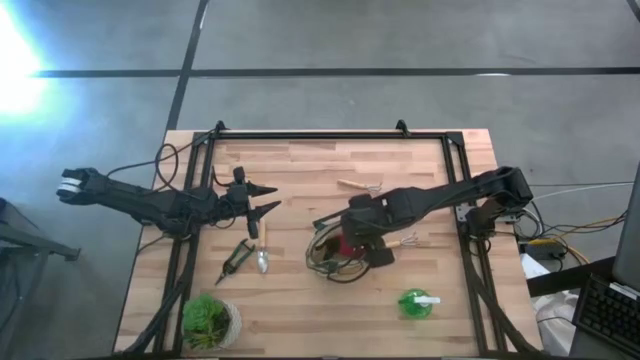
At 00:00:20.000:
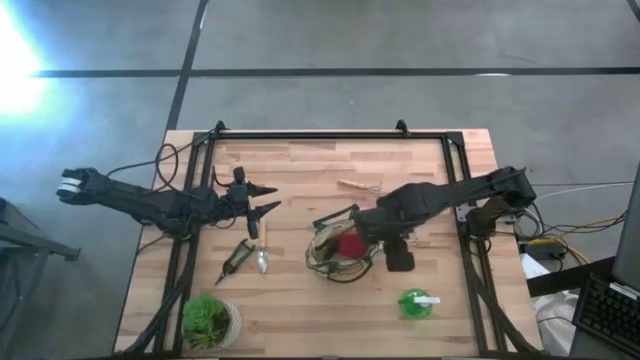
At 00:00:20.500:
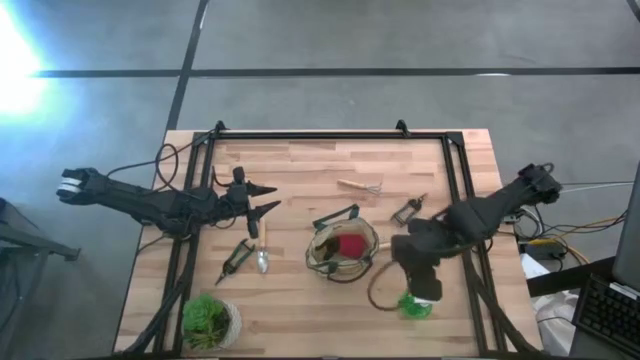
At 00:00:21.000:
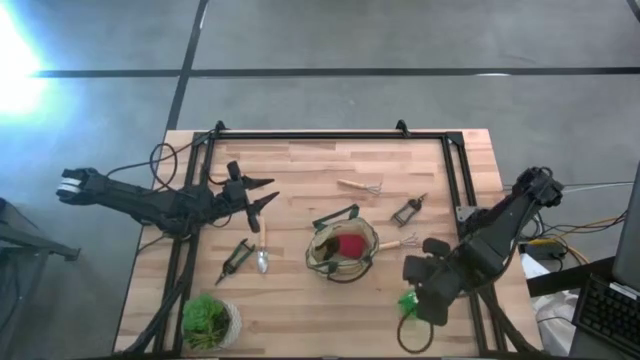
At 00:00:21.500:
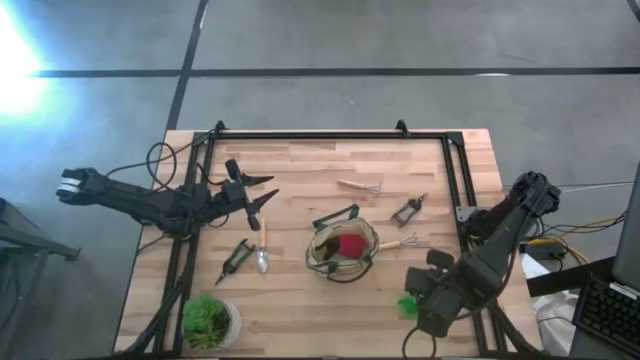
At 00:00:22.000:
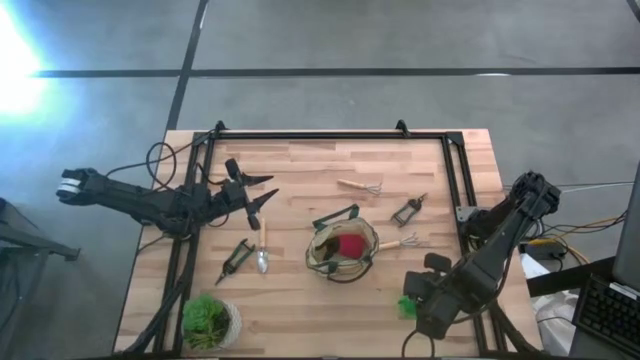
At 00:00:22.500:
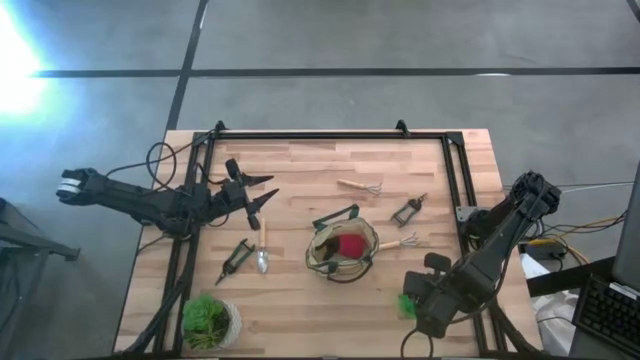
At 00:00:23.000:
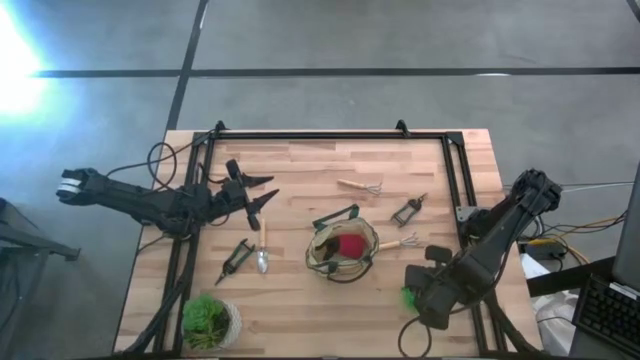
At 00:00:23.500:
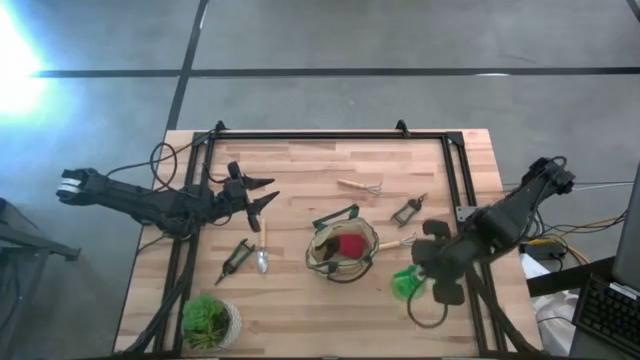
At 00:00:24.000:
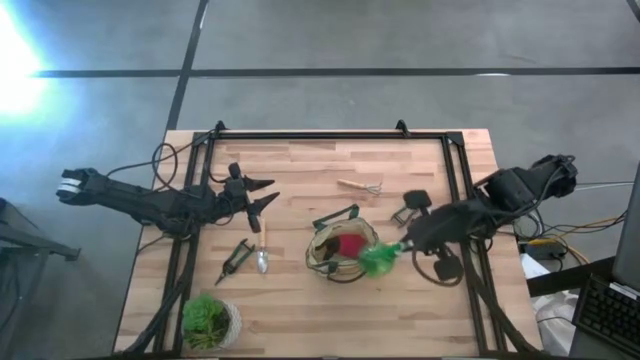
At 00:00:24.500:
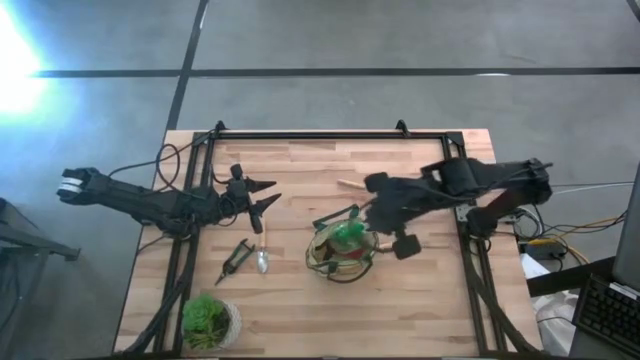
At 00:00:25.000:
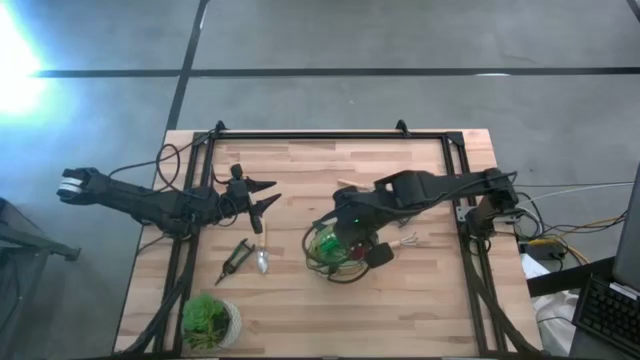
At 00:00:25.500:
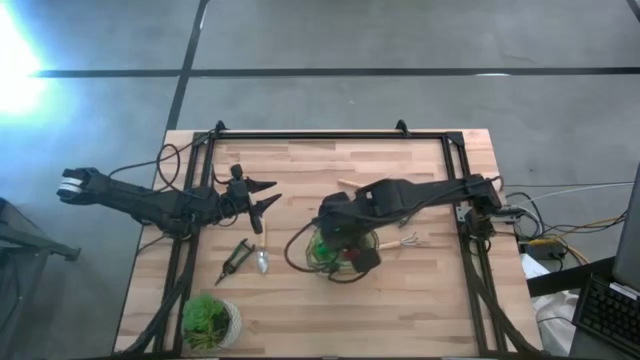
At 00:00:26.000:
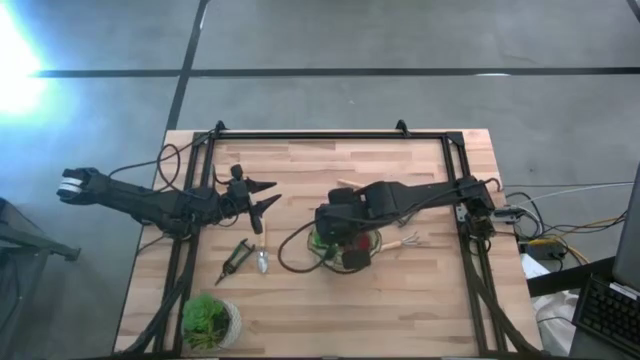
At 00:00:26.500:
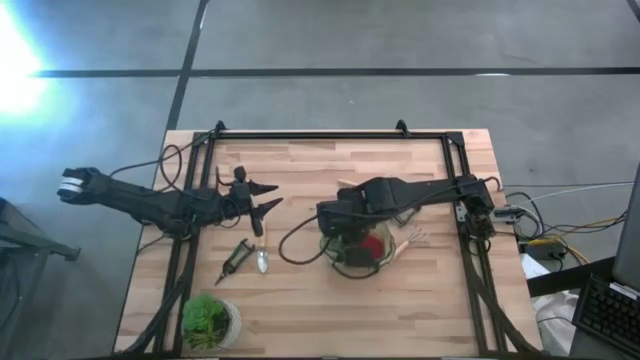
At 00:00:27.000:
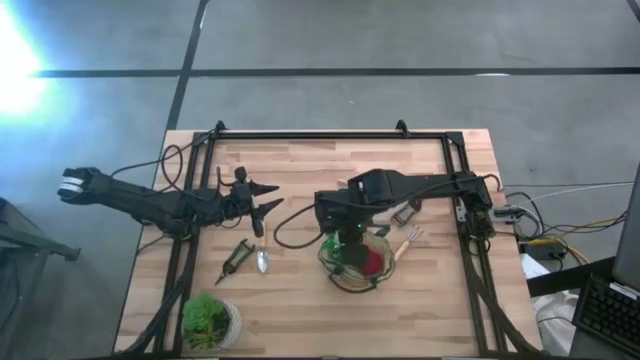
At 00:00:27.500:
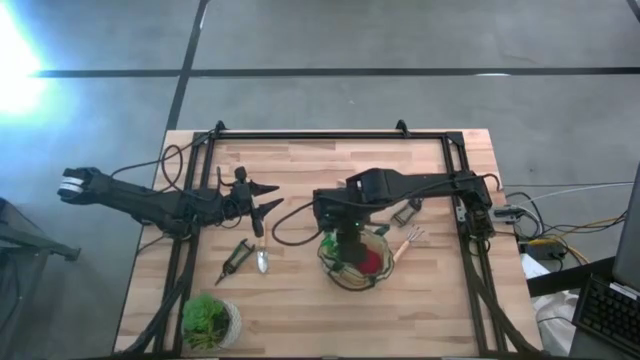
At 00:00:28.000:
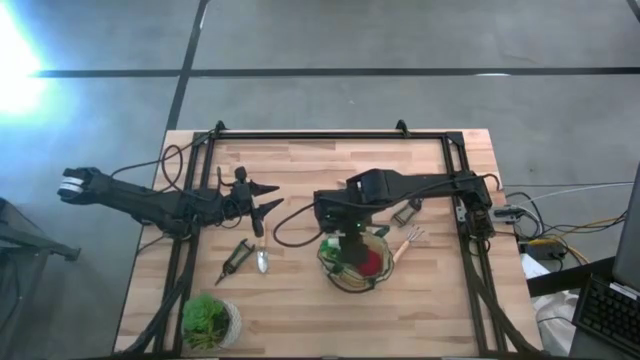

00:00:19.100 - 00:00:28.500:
Task: Pick & Place Garden tools in Gardening bag
Put the spray bottle into the gardening bag
